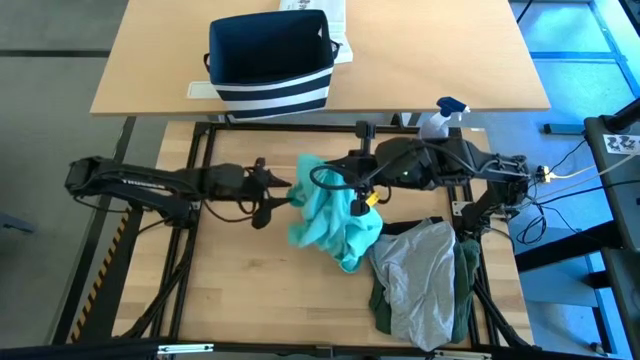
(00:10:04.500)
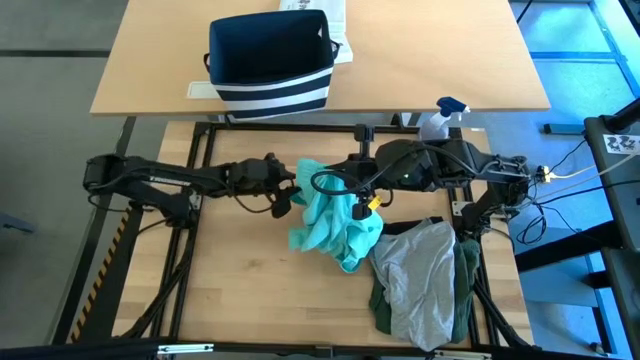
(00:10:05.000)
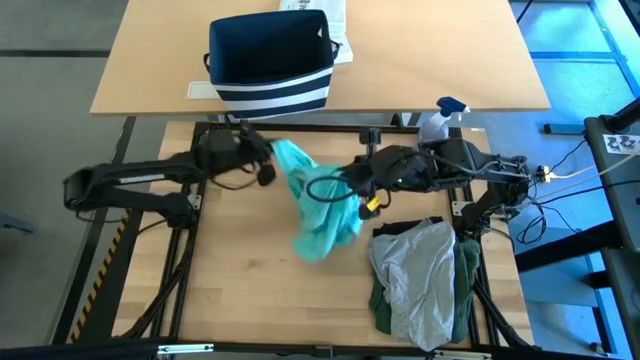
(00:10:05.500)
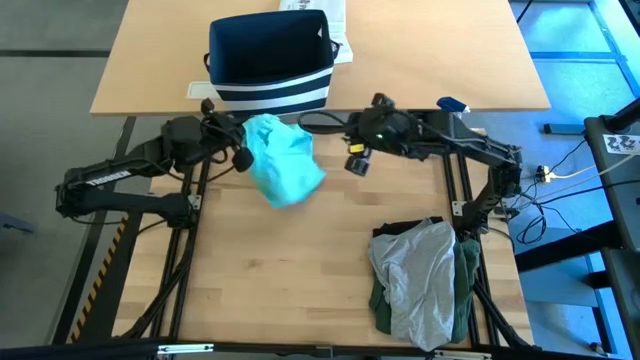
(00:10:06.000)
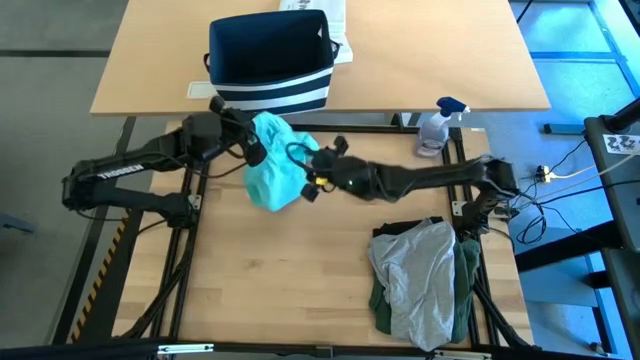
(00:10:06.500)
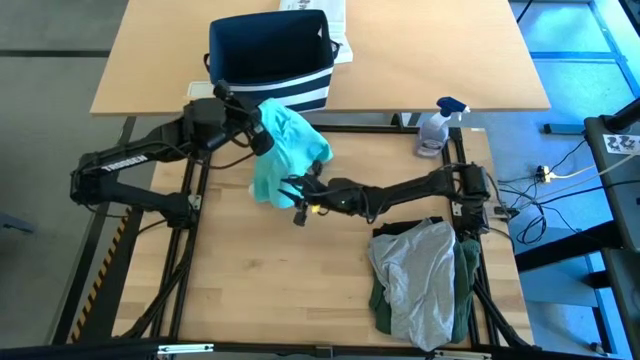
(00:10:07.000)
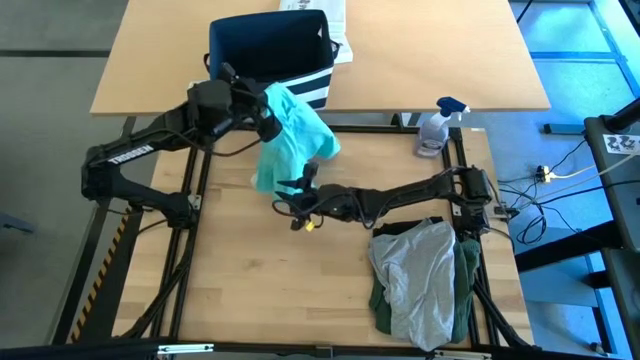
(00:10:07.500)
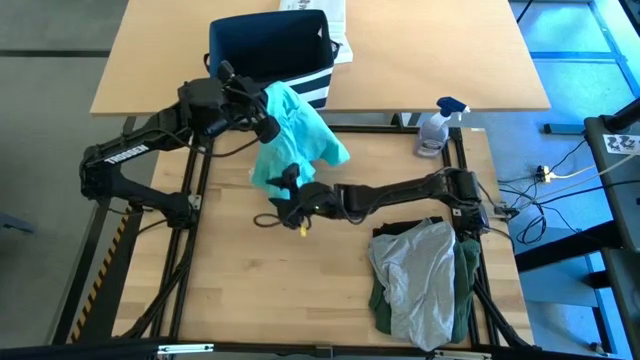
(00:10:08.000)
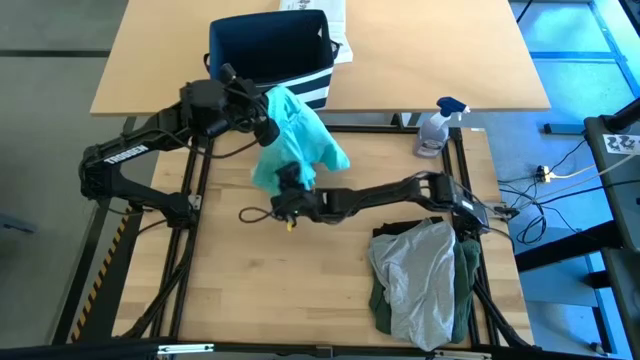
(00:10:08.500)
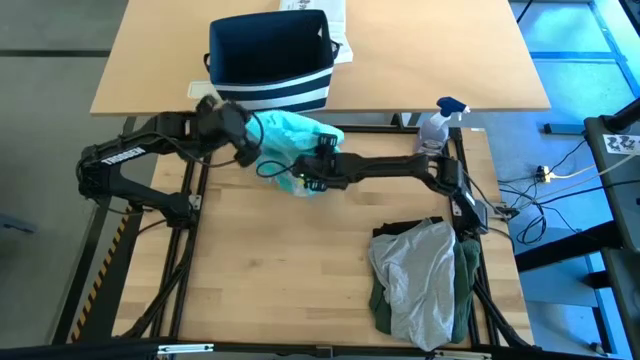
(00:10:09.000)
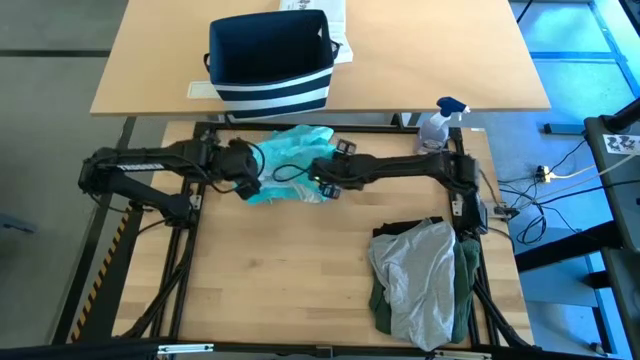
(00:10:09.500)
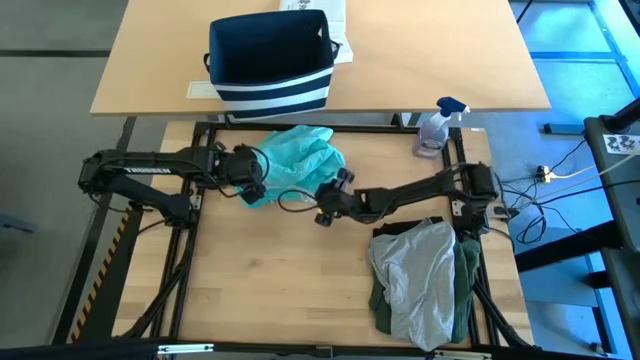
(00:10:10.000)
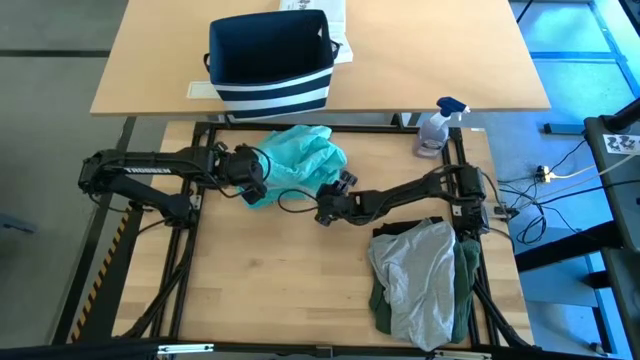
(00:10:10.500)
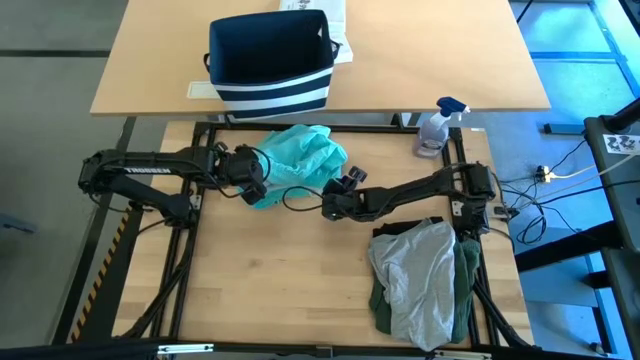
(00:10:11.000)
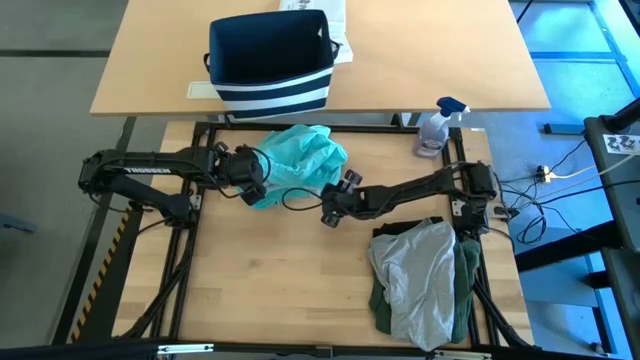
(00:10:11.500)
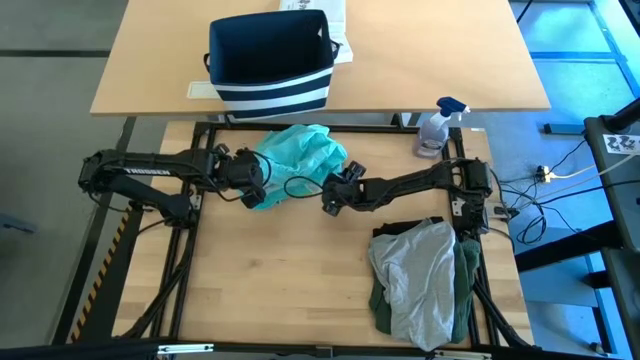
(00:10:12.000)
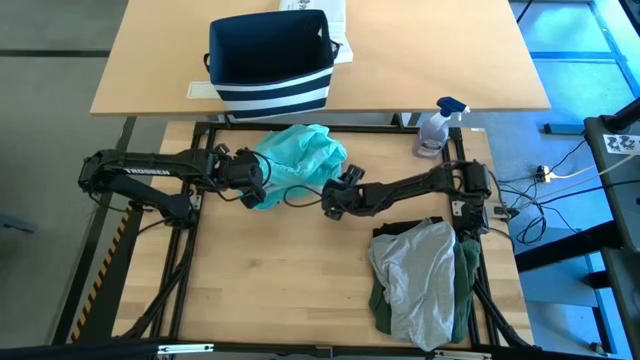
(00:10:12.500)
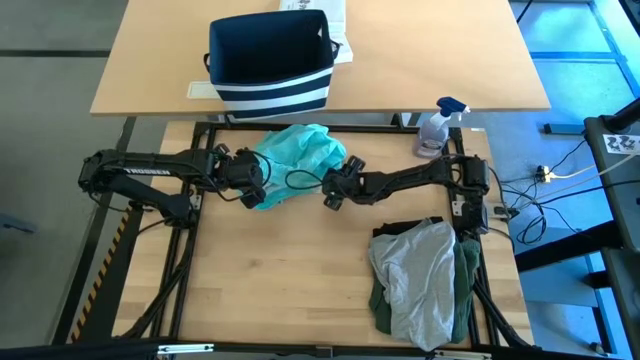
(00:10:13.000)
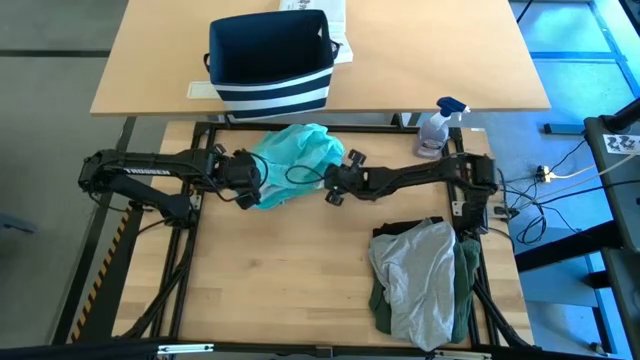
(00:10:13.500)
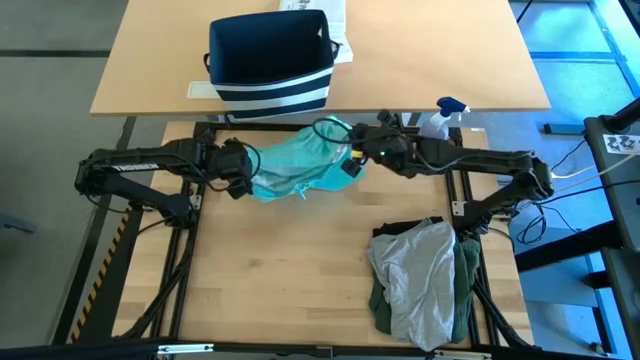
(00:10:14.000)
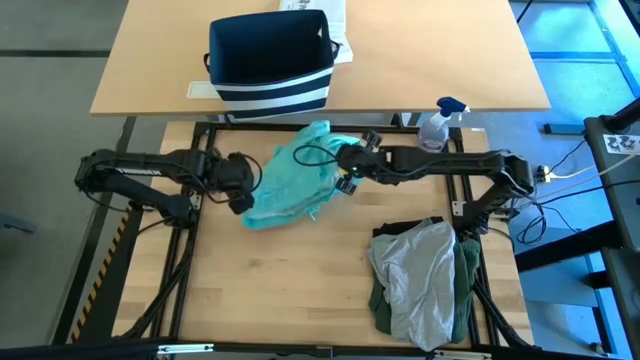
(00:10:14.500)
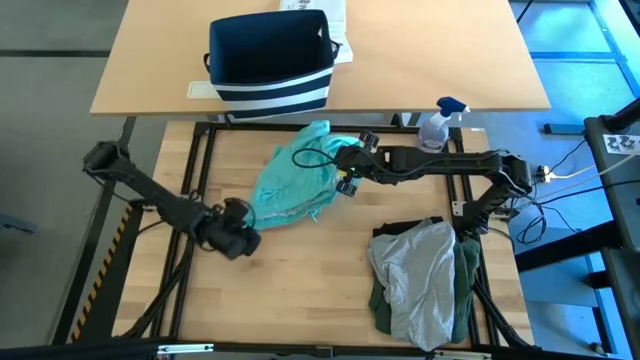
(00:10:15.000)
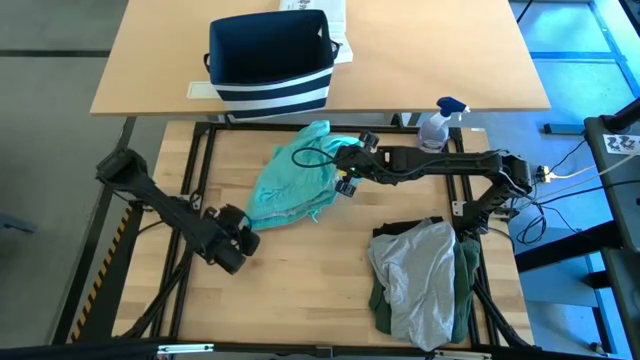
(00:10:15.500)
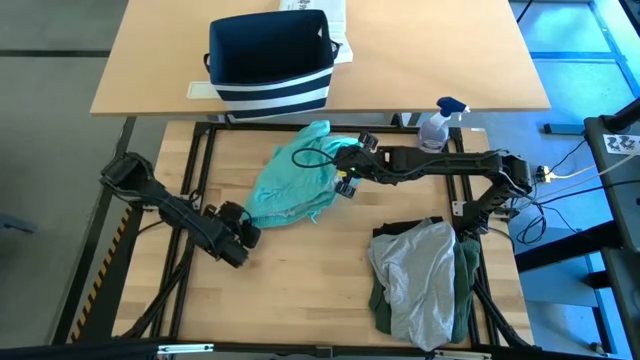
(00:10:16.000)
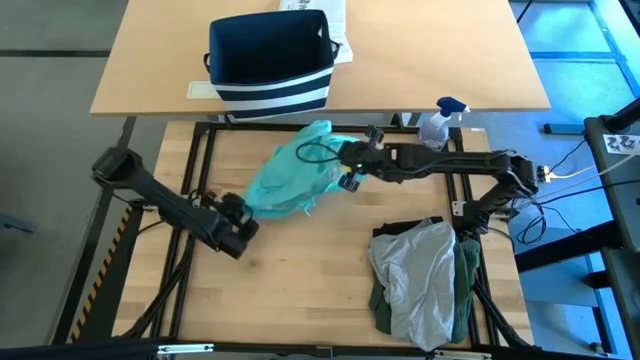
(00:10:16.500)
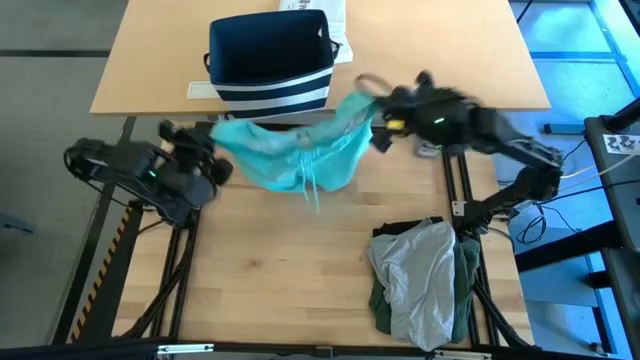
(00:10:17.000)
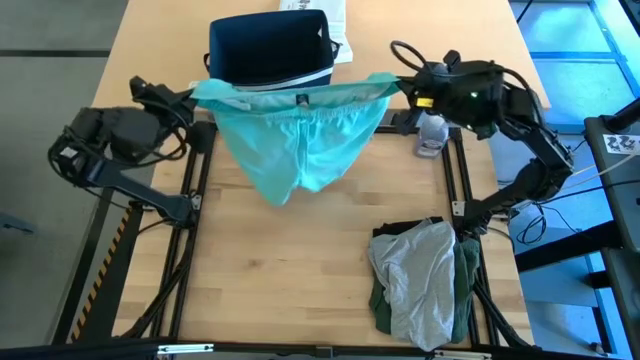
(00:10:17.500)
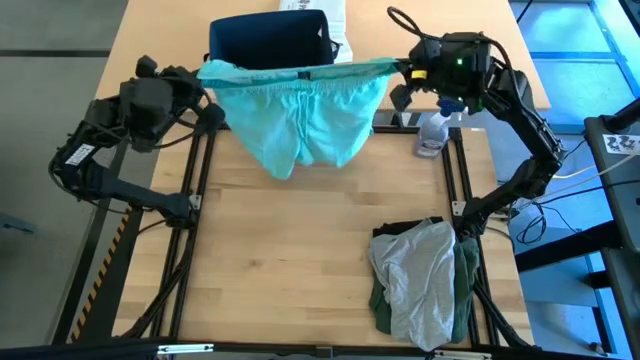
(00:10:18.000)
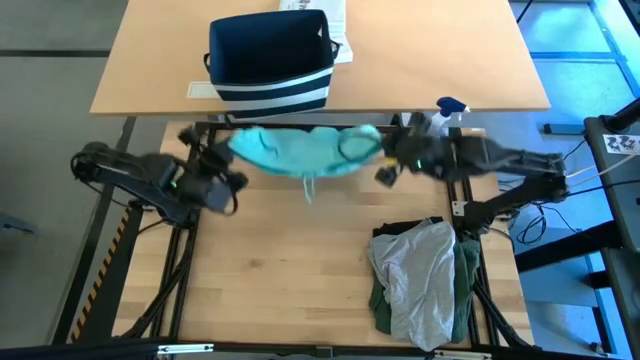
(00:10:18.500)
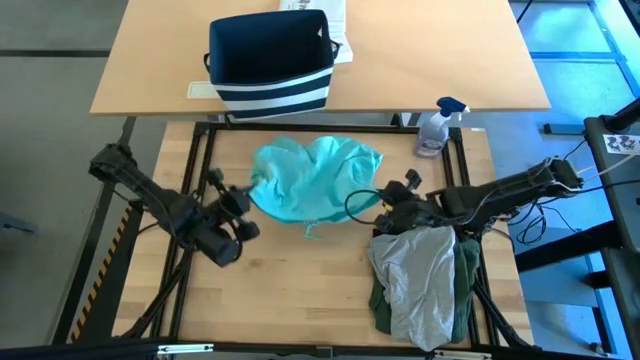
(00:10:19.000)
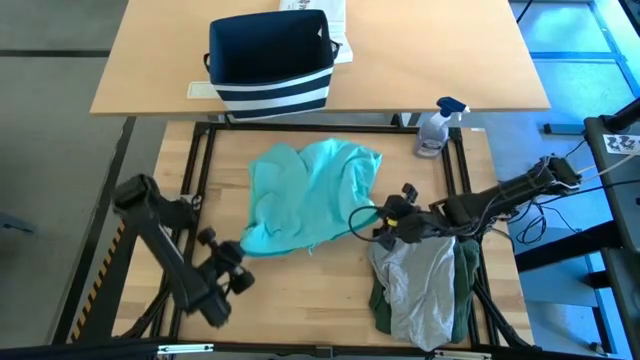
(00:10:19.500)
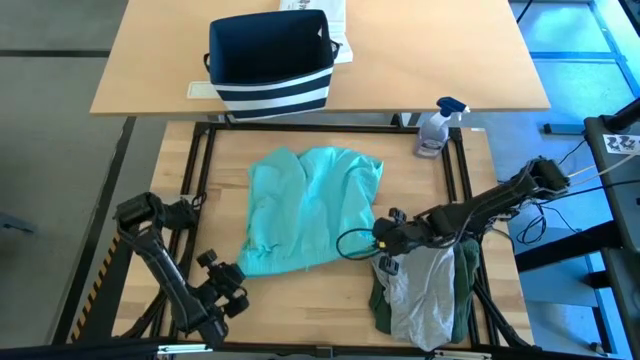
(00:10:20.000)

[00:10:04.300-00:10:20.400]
Task: Fold Laundry from Bin
Fold the blue shorts

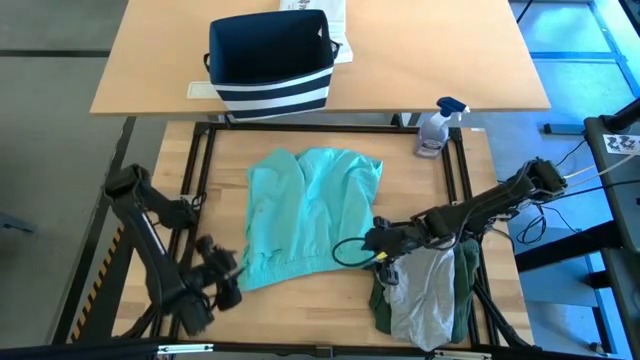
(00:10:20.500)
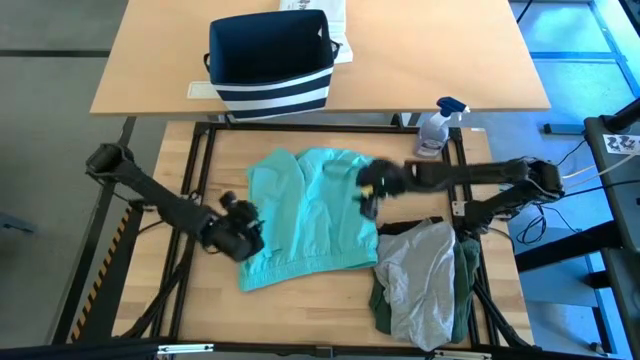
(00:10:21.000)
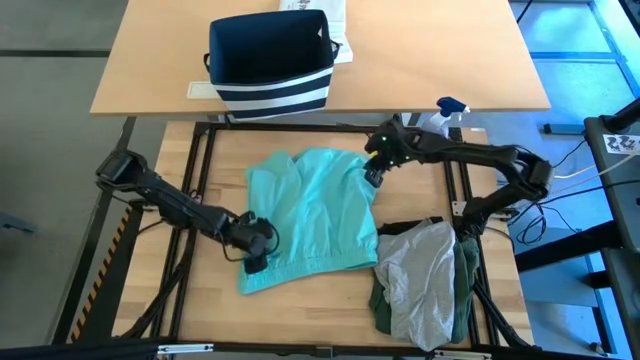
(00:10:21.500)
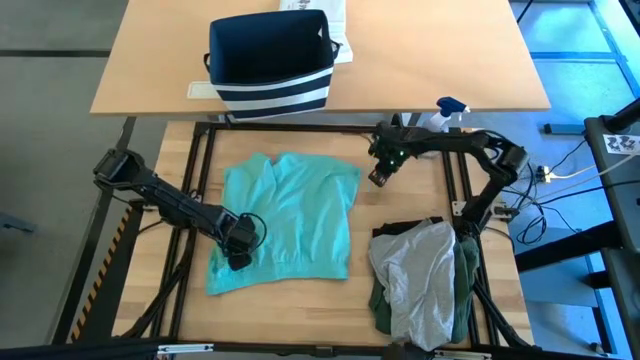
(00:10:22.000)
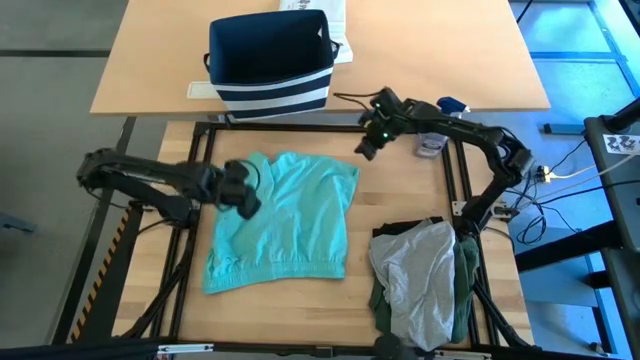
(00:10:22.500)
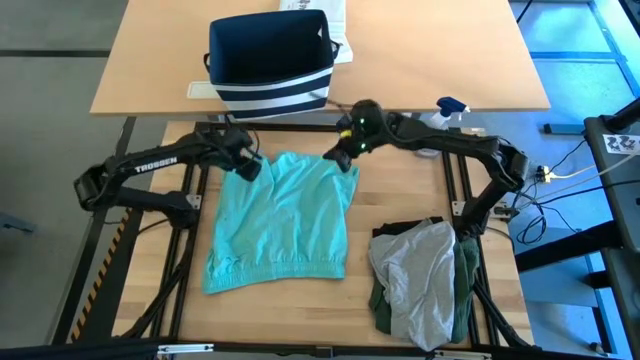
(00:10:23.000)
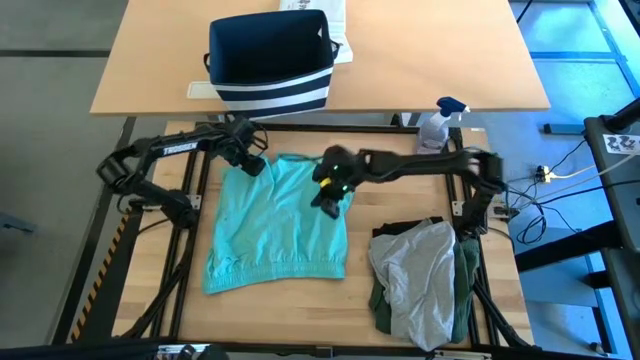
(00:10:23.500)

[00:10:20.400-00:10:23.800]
Fold the blue shorts
